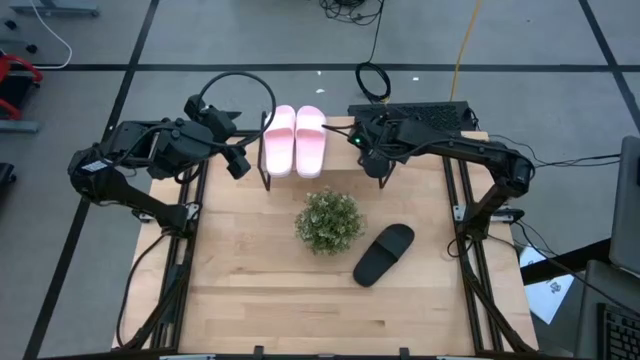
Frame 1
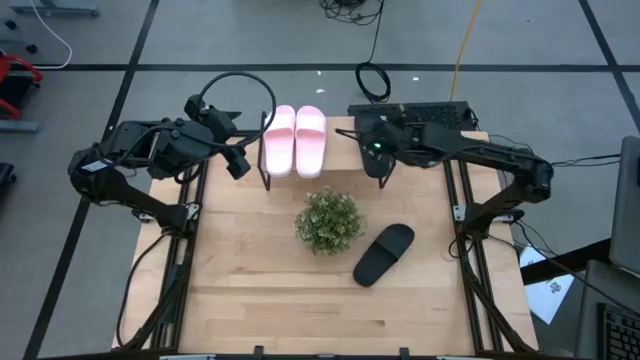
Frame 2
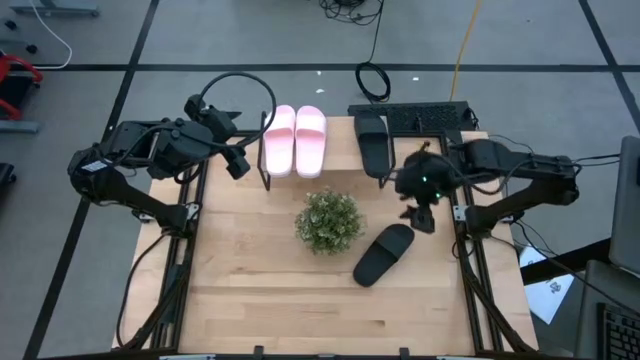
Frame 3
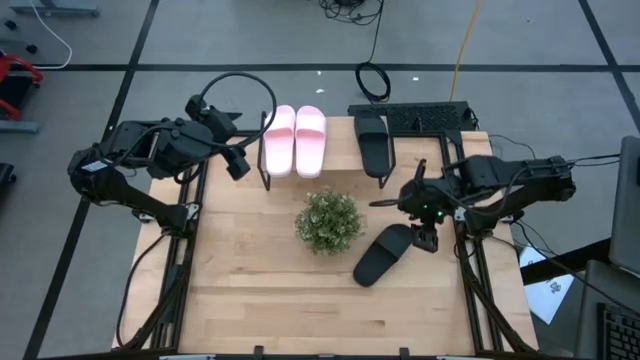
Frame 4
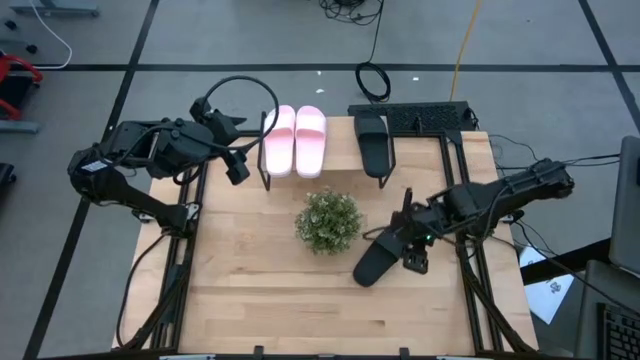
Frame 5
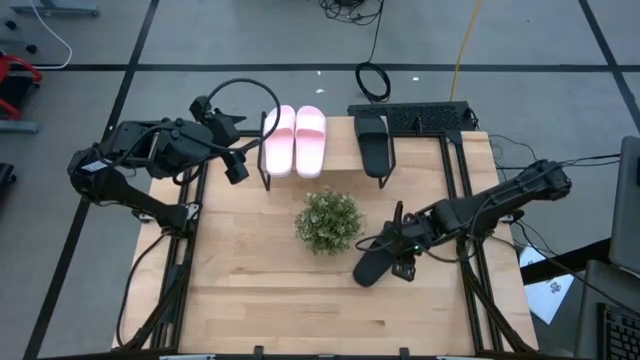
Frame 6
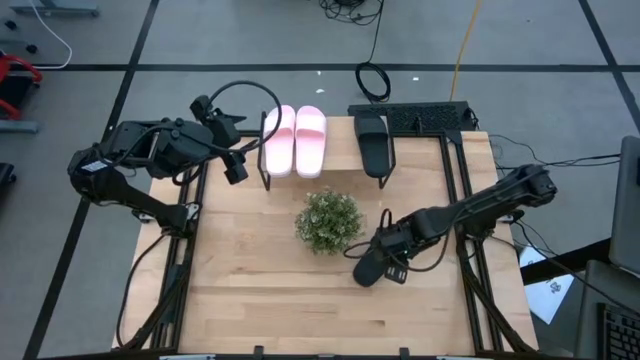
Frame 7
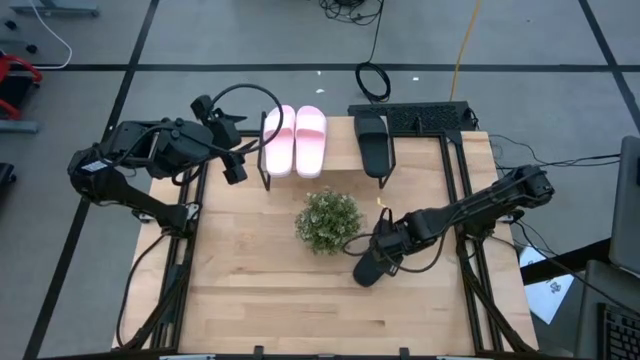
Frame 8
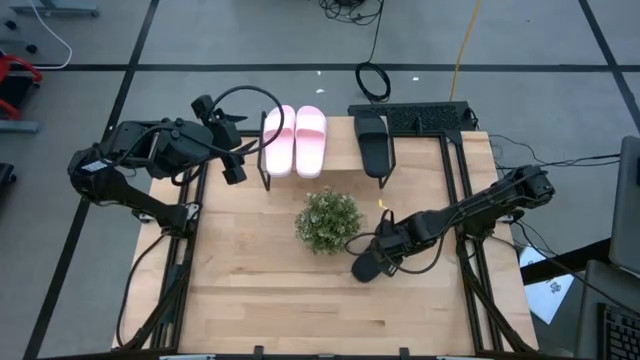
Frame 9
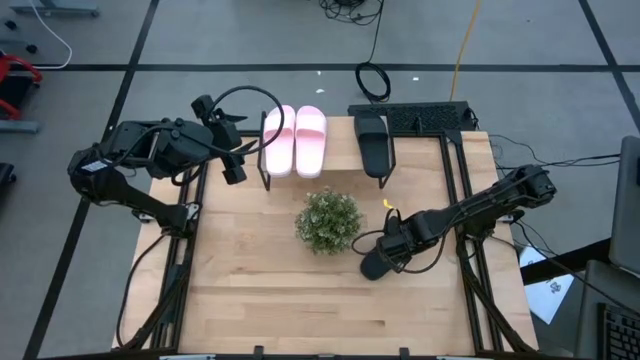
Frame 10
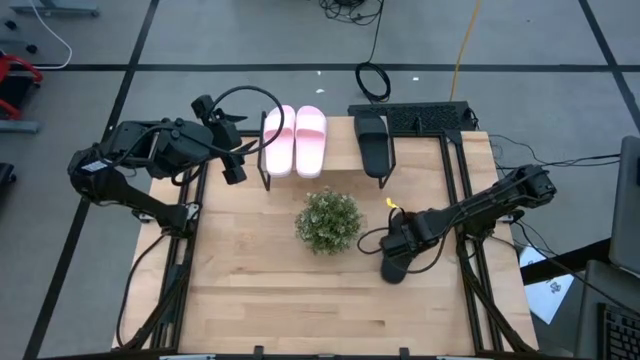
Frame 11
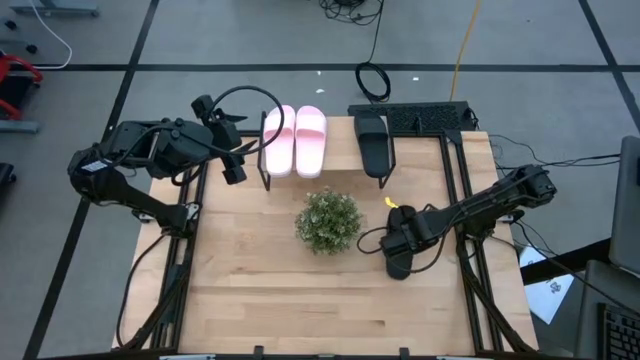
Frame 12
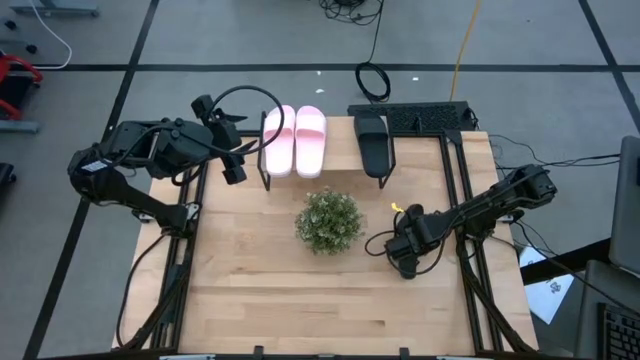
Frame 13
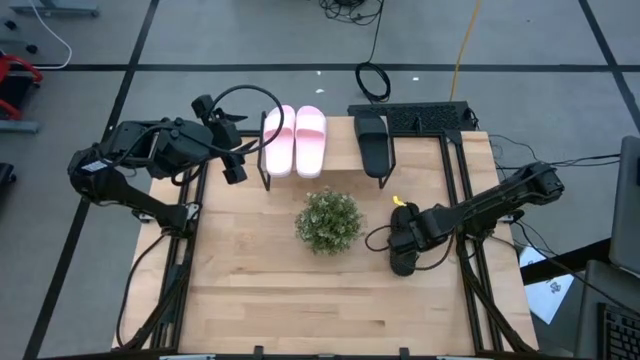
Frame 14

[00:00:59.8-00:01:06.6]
Task: Pick and place slides into the shelf
Put the black slipper on the shelf

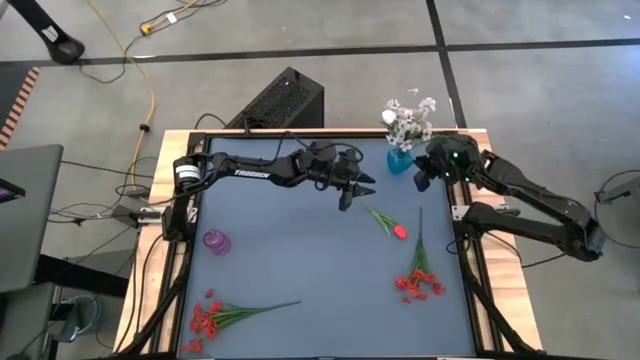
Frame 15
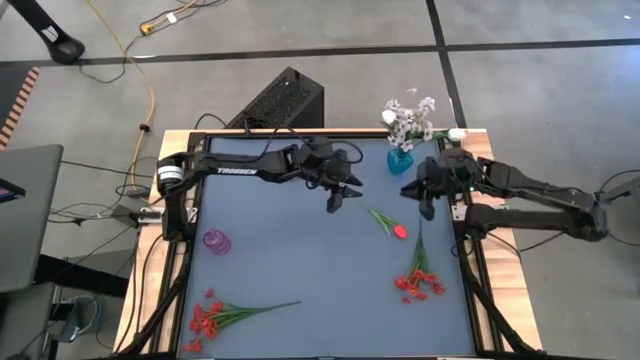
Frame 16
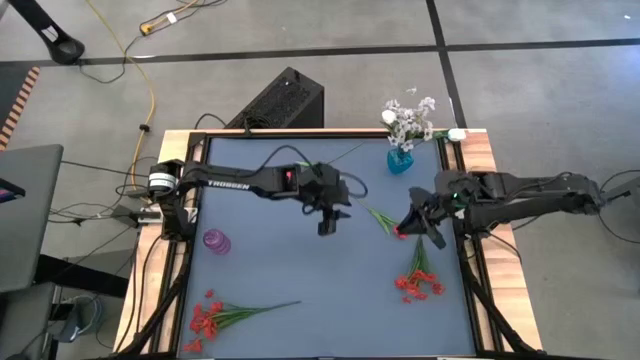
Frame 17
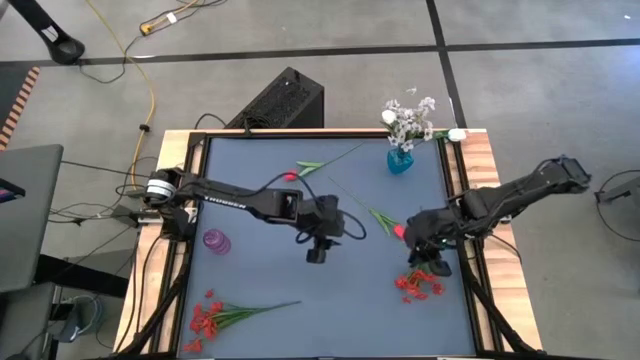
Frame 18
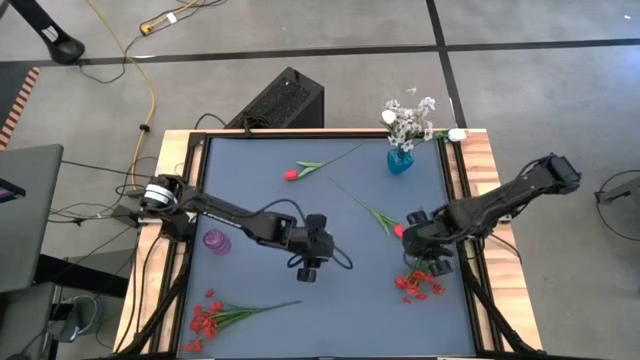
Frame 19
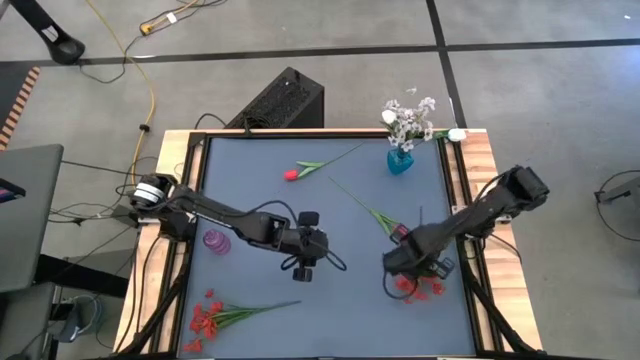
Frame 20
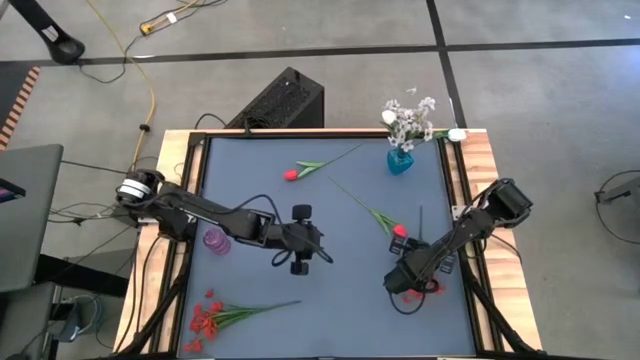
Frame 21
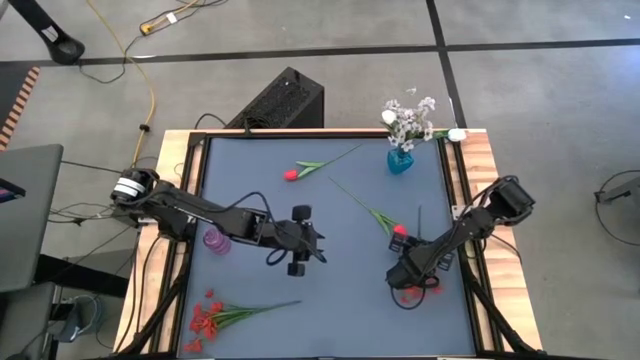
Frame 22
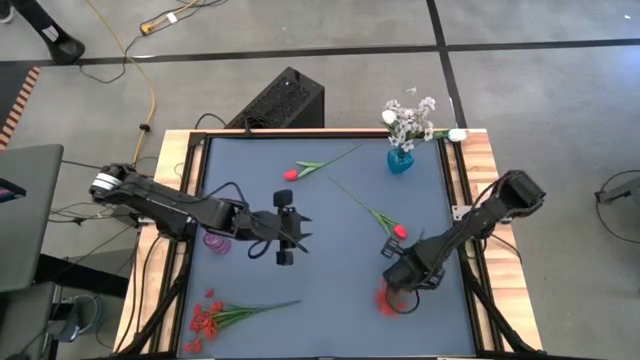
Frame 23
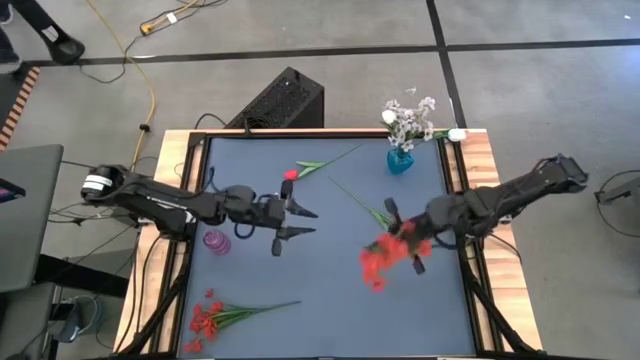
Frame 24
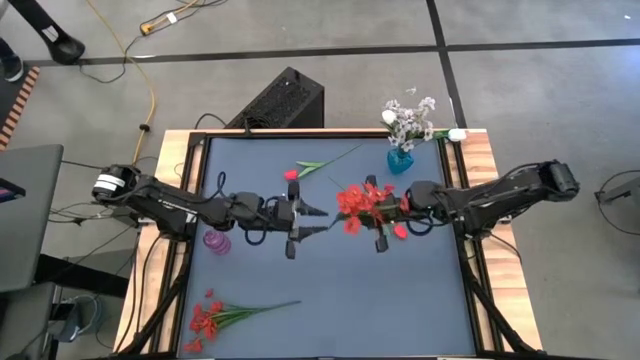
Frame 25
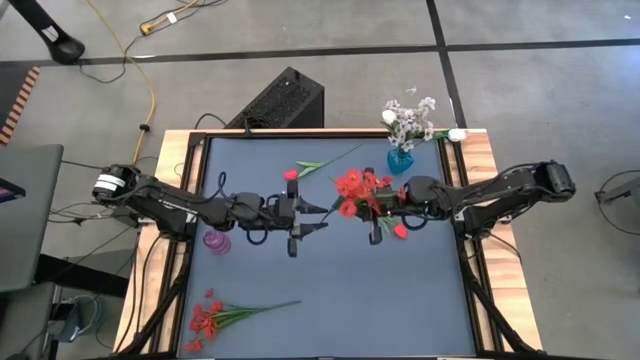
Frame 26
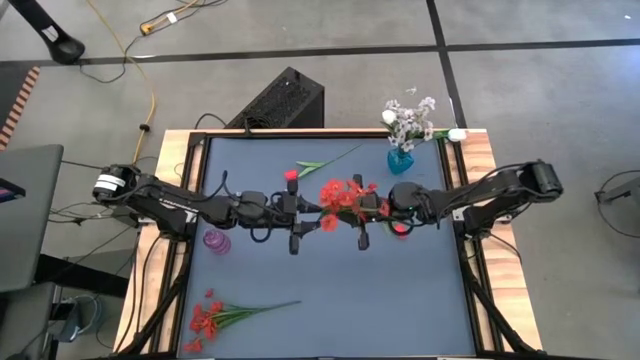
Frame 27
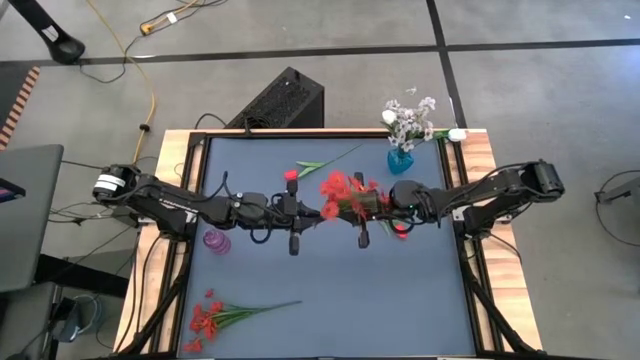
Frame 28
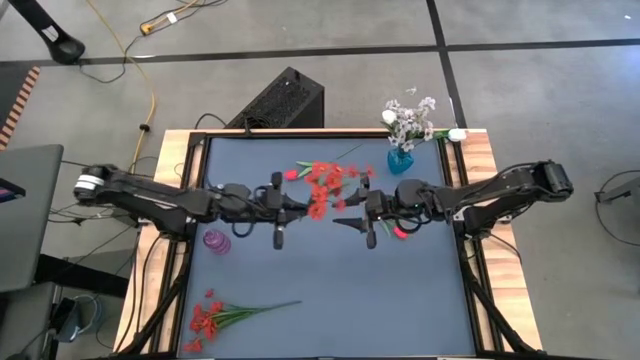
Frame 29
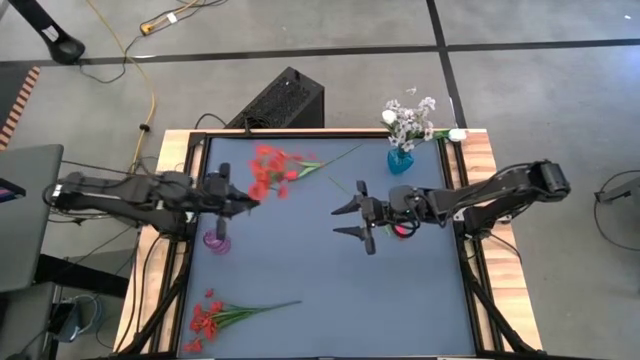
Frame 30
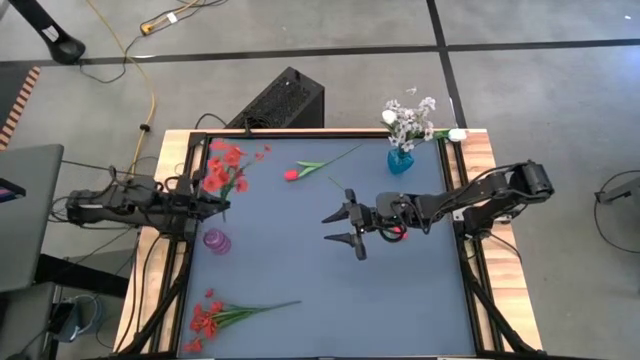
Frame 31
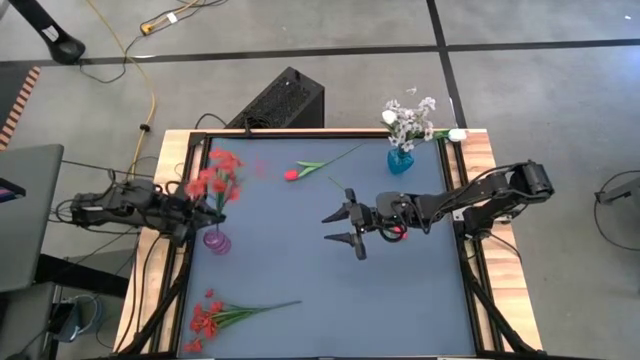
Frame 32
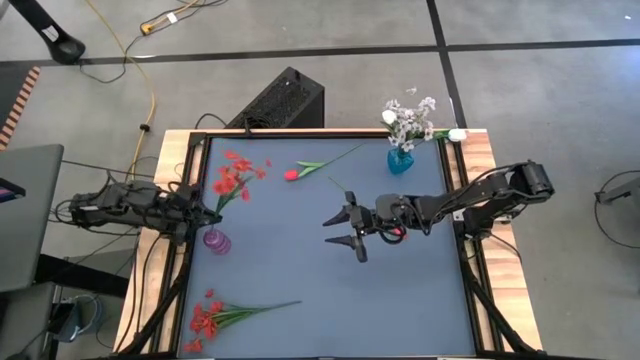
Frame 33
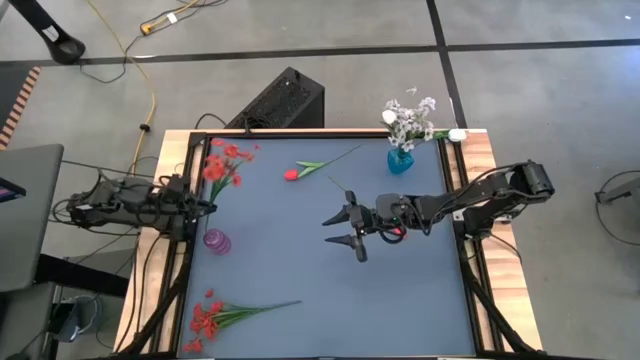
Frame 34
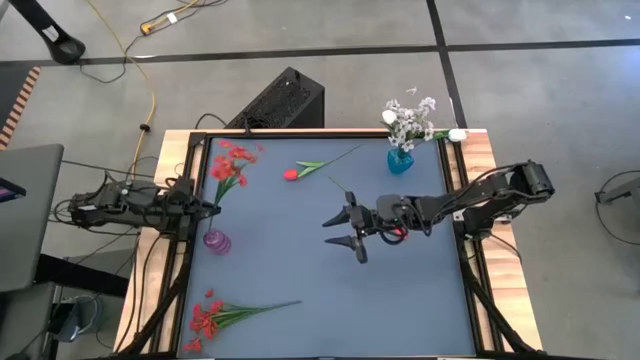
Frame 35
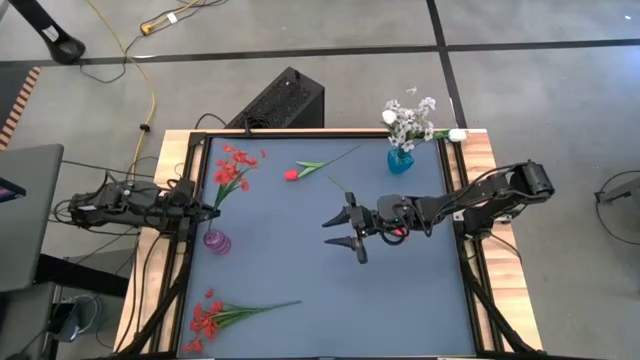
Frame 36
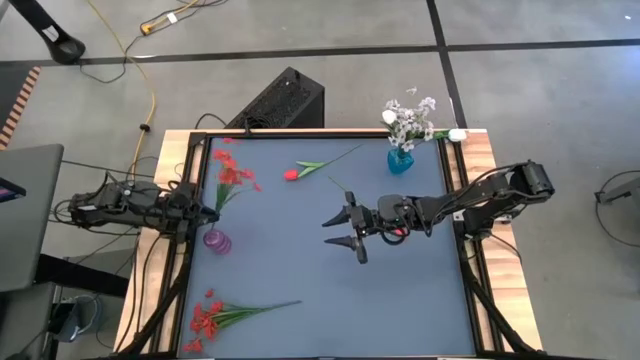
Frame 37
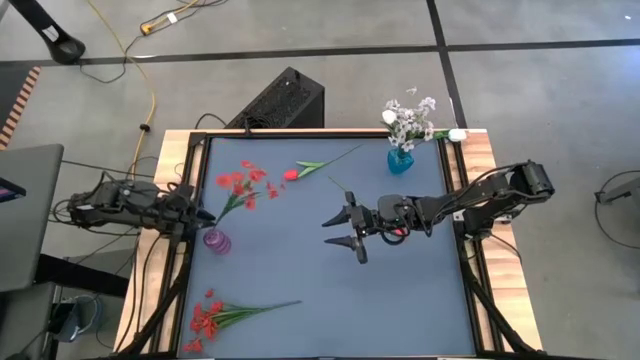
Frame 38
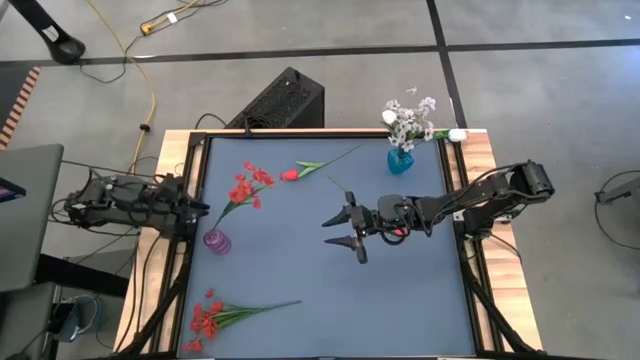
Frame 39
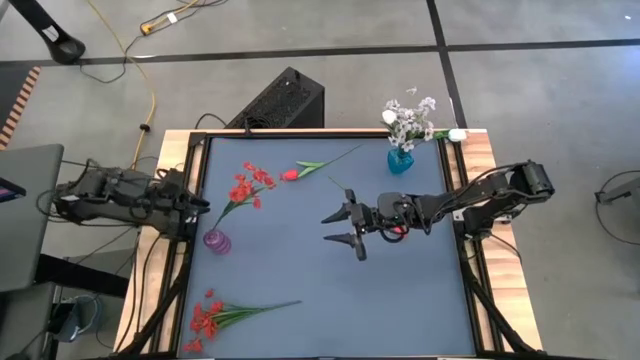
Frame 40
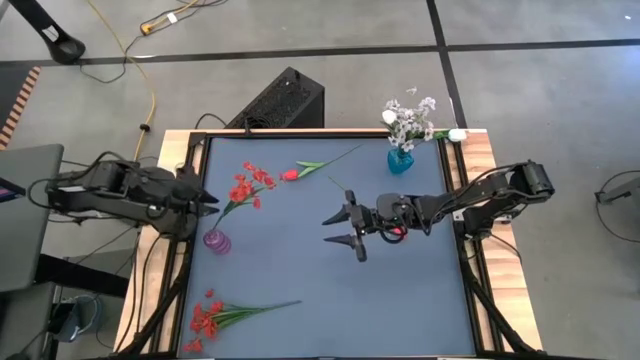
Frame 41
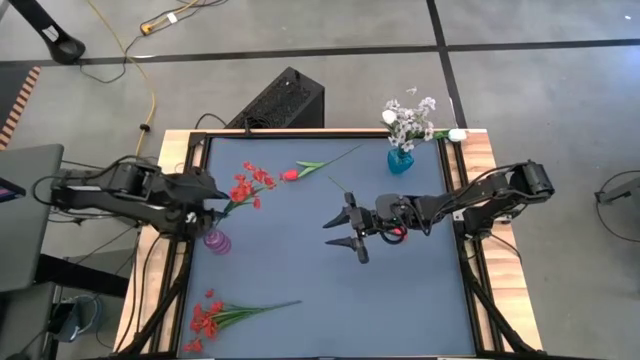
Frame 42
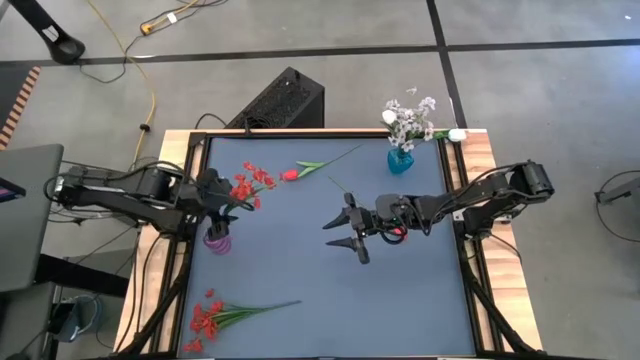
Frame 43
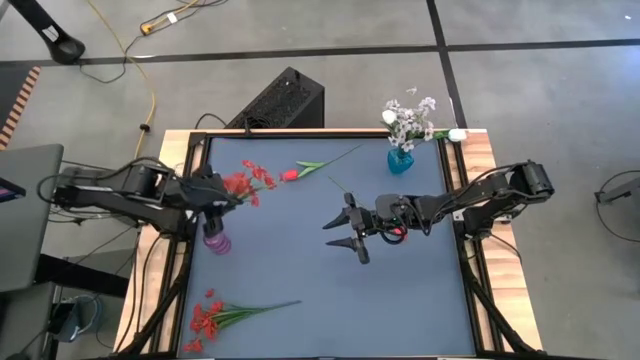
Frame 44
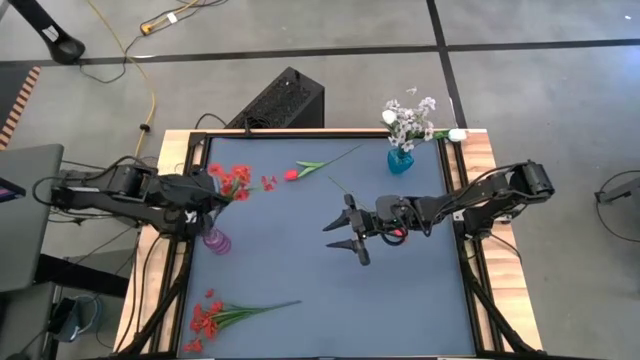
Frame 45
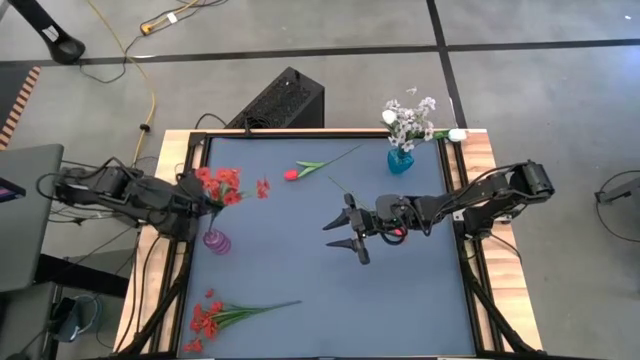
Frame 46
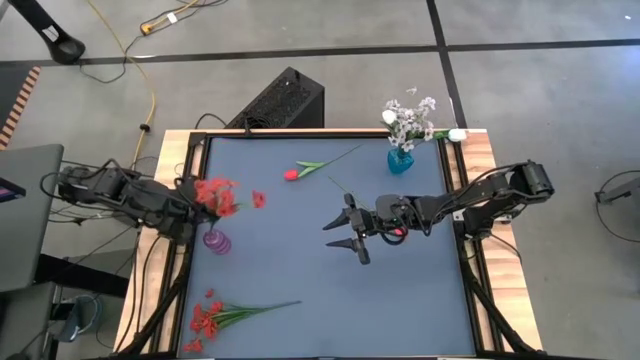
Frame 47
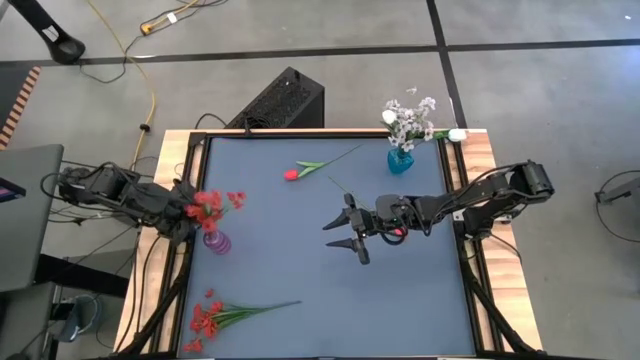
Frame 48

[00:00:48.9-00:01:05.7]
Task: Sort flowers into vase by color
Put the right red flowers into the purple vase
